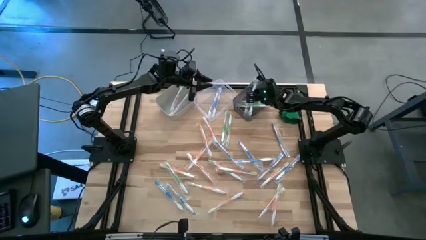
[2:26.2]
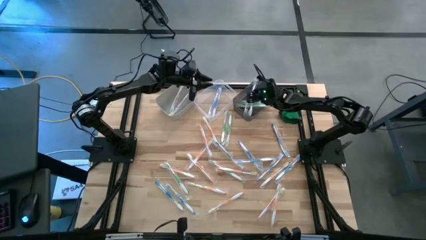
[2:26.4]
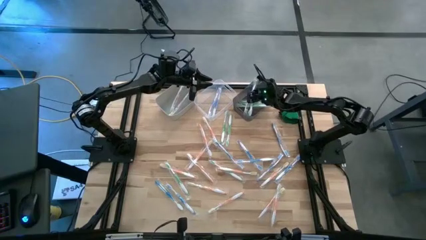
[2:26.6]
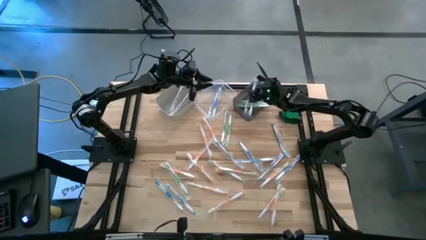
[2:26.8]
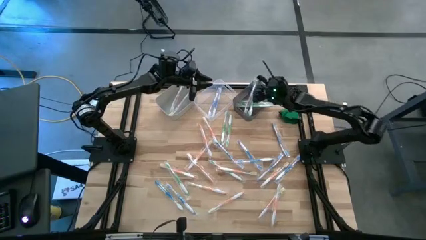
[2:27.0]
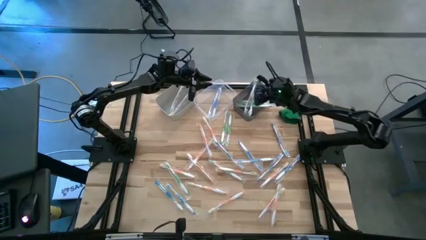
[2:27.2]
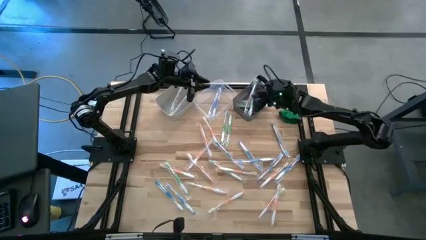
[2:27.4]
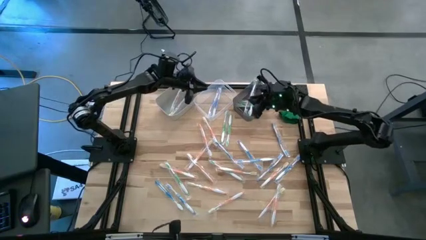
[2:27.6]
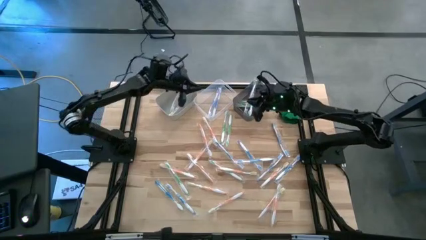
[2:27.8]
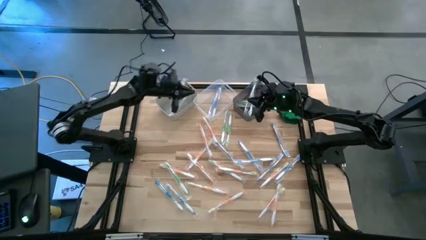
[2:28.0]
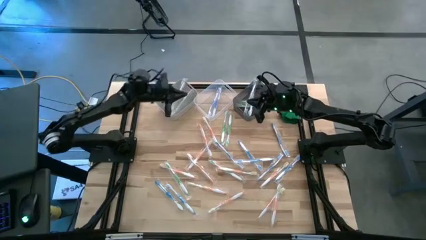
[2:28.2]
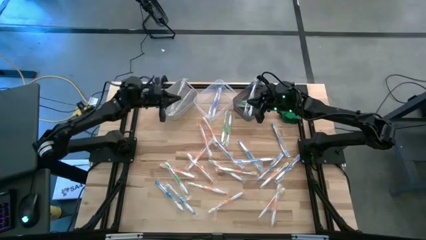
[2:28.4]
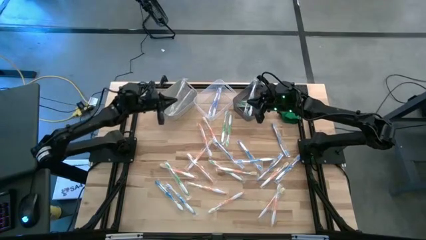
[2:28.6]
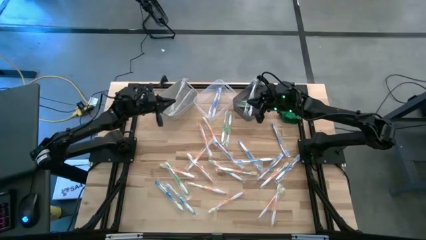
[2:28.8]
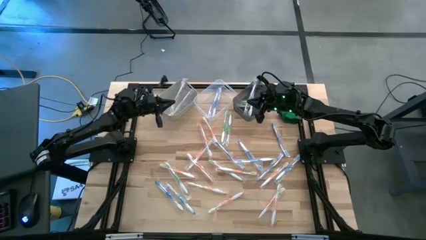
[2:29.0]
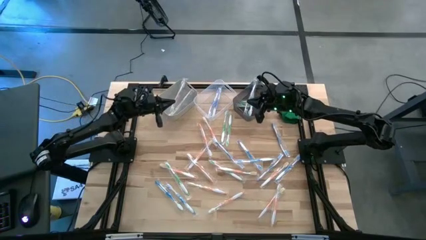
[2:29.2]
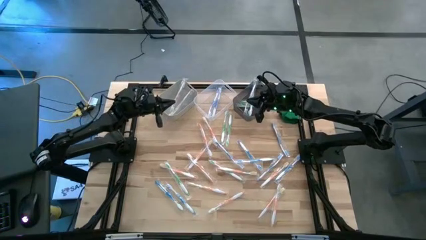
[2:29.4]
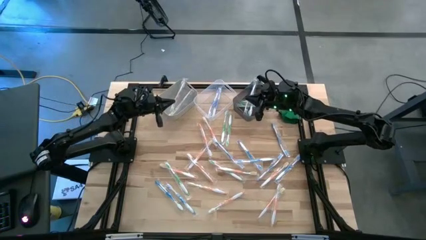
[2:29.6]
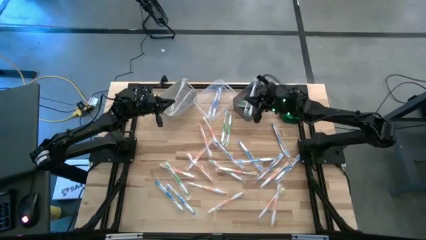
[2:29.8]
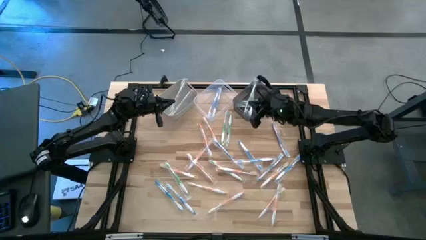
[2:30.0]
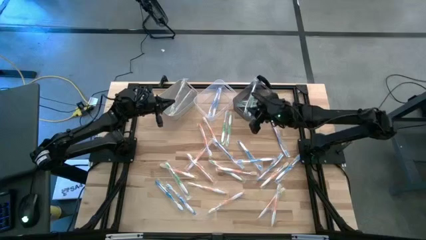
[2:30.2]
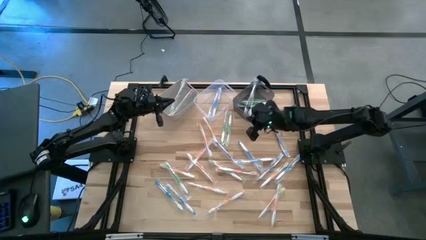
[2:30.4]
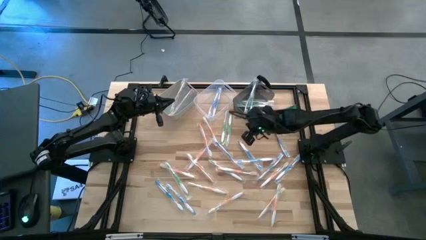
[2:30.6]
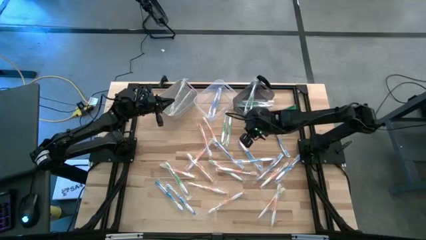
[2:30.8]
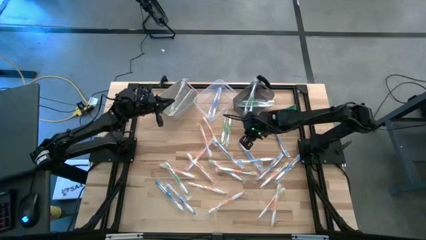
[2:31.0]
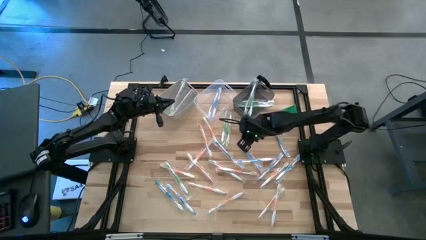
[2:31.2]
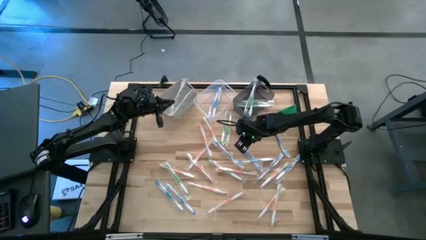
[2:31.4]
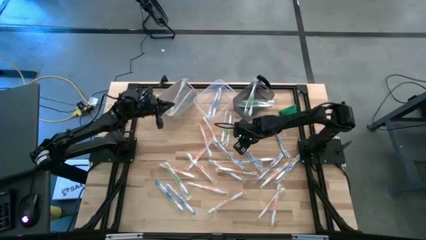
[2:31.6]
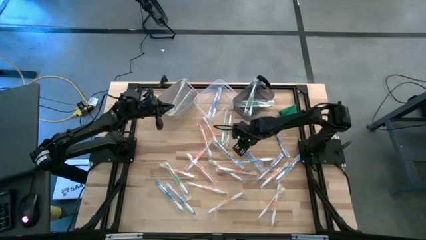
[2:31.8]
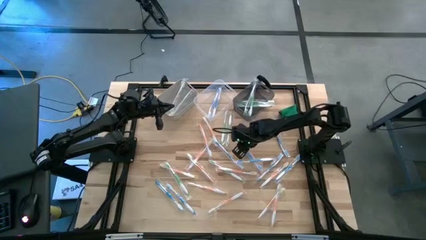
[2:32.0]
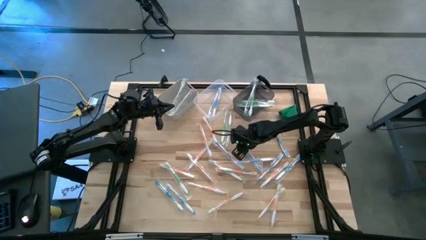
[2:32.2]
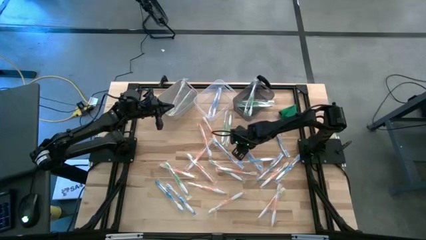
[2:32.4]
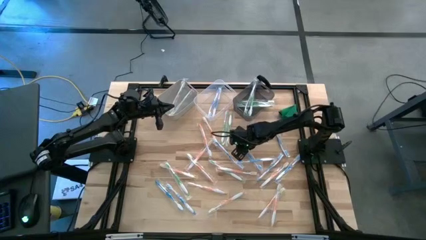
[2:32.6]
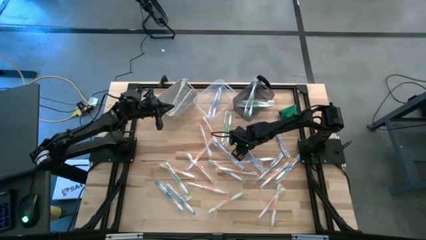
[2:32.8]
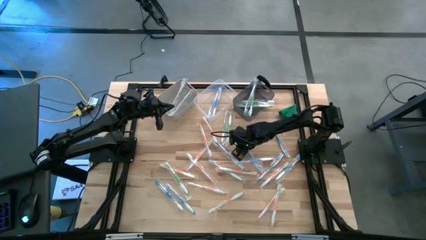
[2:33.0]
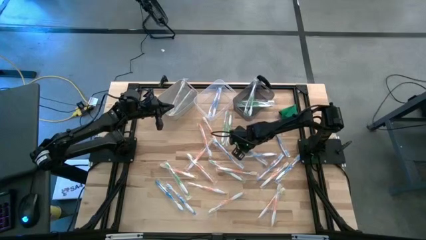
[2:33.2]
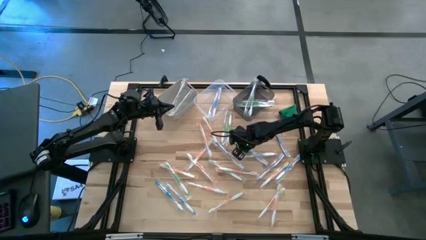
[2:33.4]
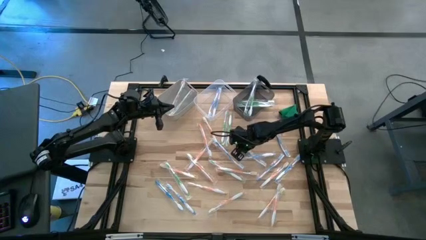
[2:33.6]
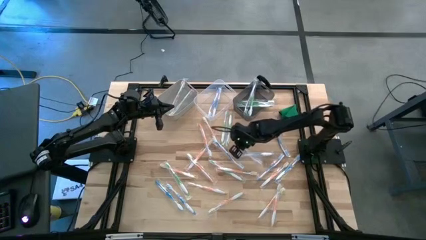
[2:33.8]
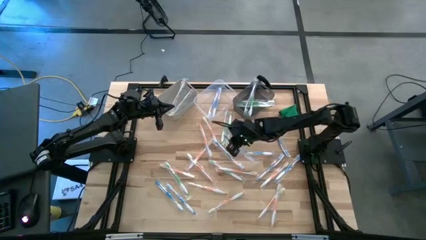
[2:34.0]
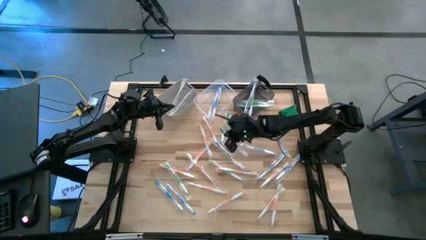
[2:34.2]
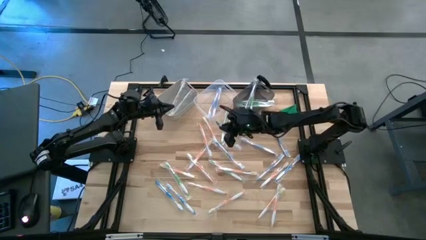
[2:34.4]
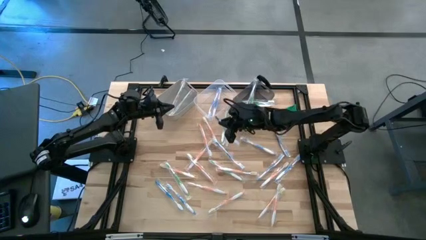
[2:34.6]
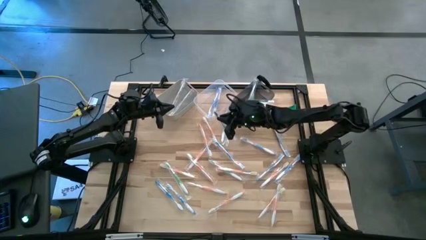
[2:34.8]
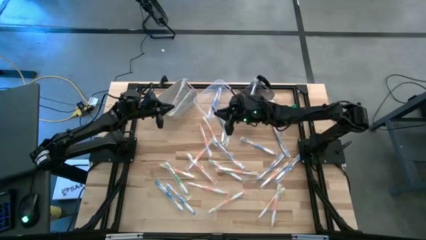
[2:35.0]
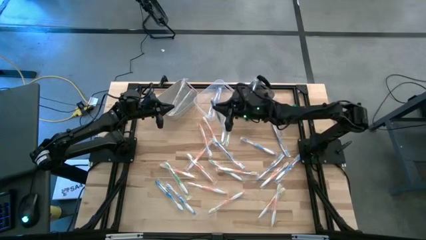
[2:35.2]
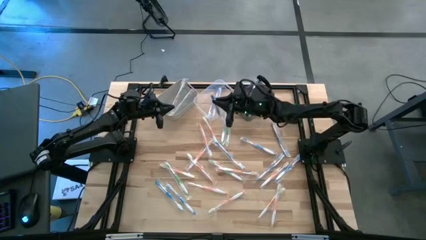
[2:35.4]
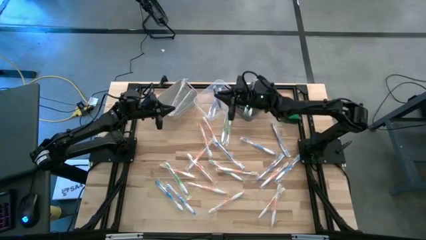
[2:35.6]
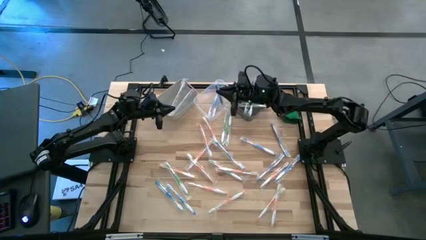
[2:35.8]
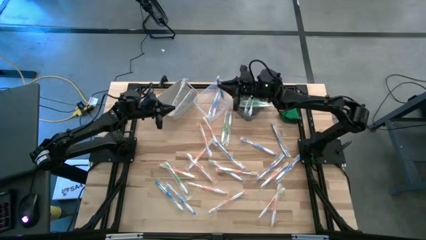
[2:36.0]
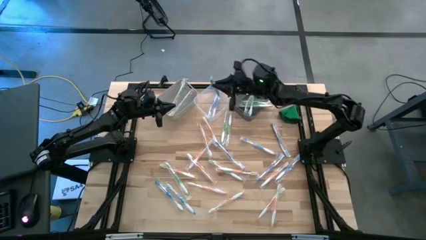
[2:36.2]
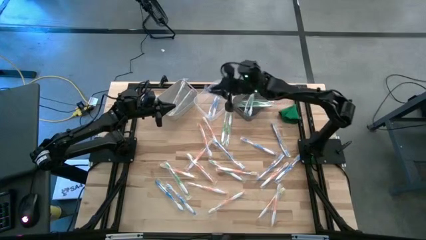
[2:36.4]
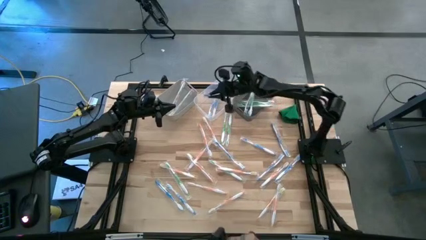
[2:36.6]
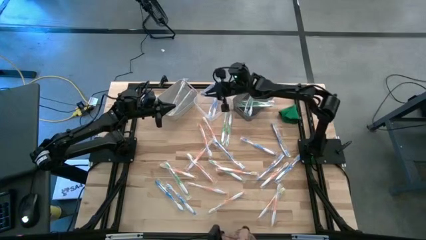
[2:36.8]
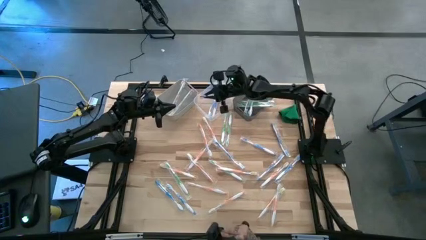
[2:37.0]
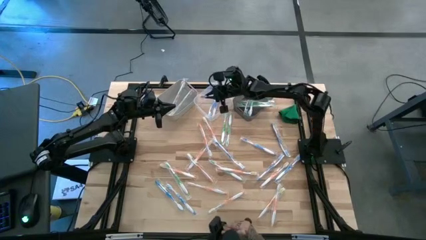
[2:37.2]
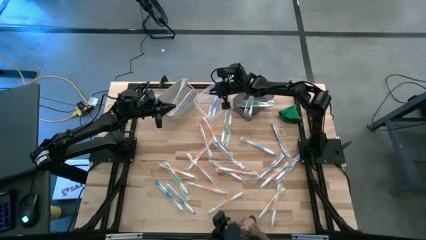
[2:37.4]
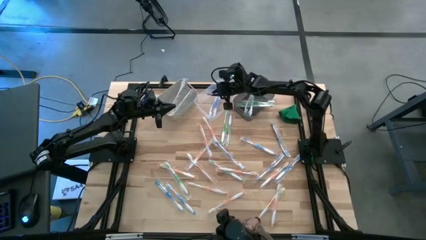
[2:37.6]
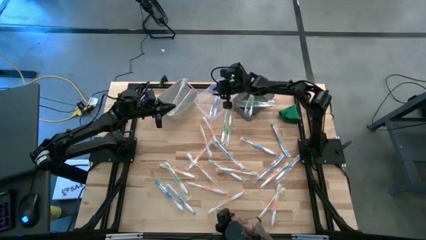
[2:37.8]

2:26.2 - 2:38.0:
Task: Pick & Place Toothbrushes
Put the blue toothbrush into the transparent bin

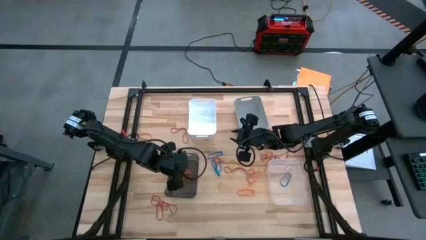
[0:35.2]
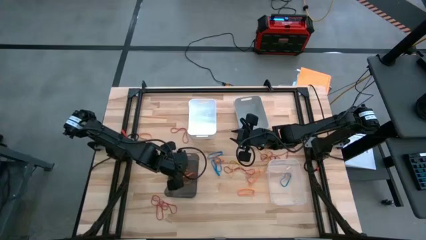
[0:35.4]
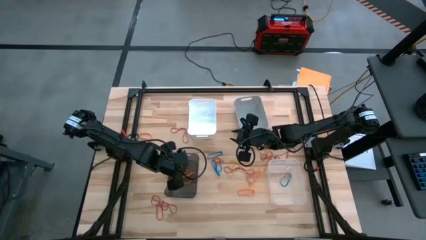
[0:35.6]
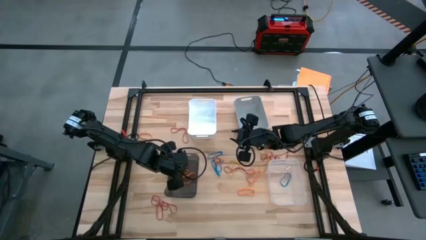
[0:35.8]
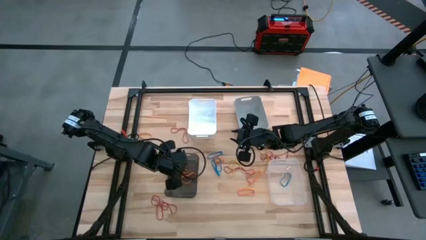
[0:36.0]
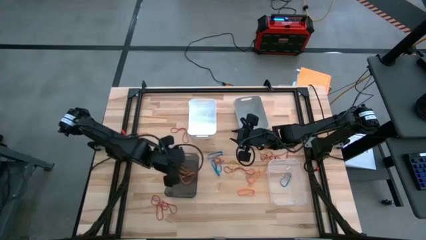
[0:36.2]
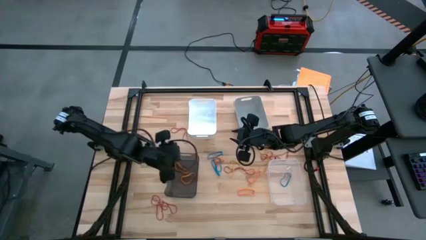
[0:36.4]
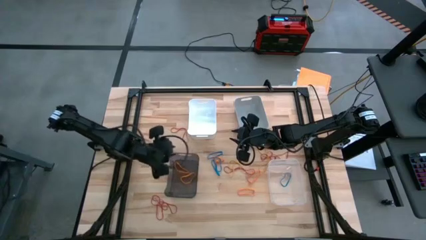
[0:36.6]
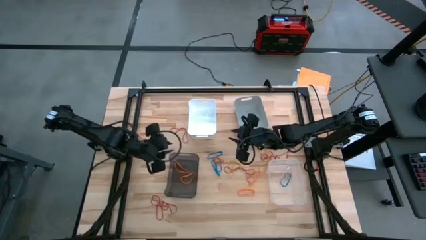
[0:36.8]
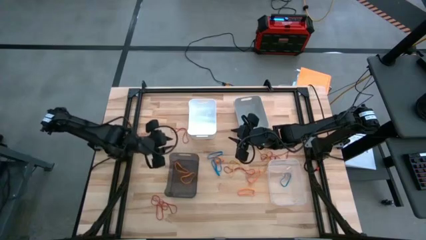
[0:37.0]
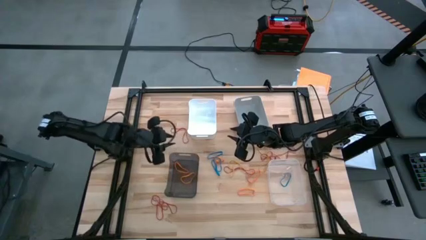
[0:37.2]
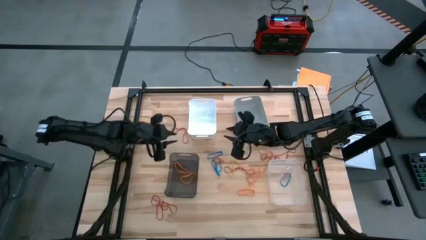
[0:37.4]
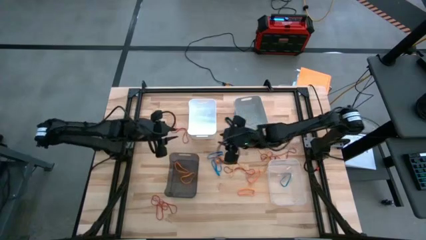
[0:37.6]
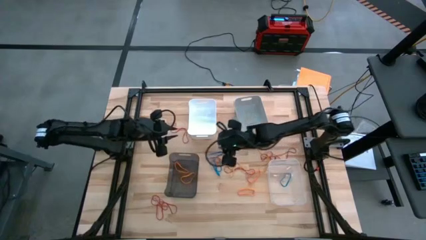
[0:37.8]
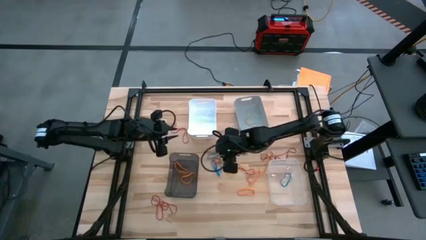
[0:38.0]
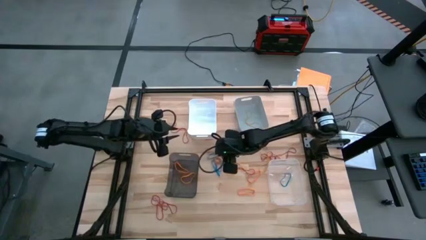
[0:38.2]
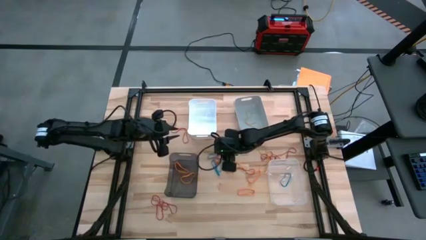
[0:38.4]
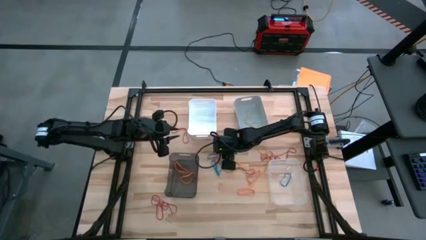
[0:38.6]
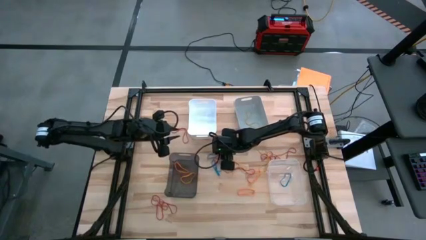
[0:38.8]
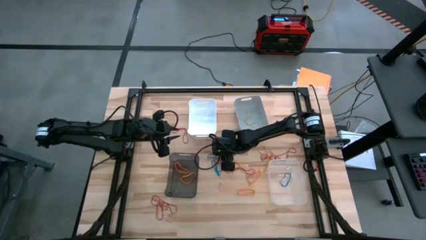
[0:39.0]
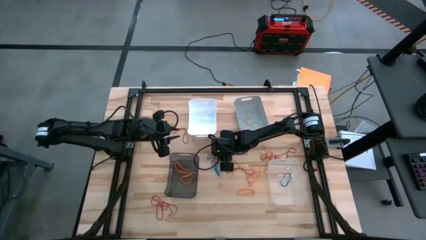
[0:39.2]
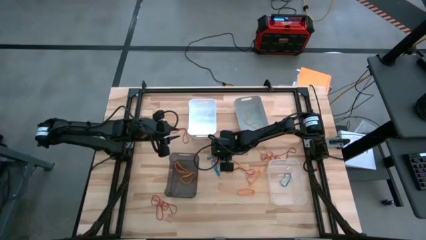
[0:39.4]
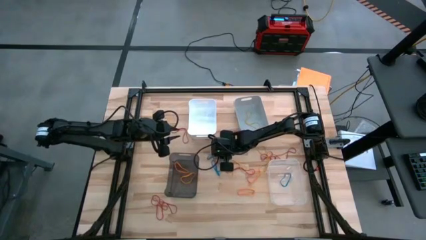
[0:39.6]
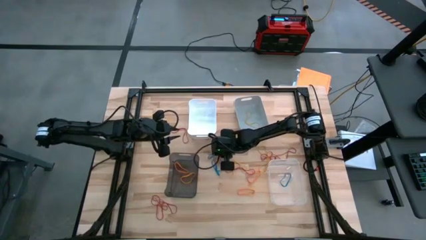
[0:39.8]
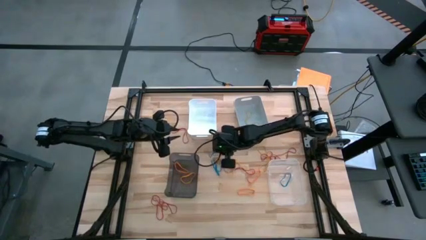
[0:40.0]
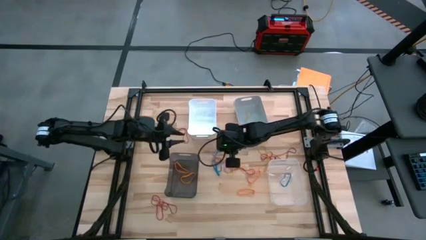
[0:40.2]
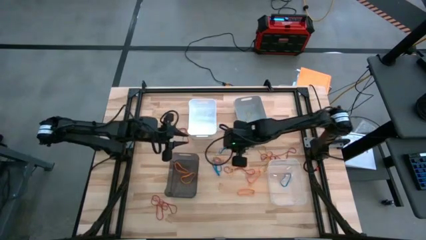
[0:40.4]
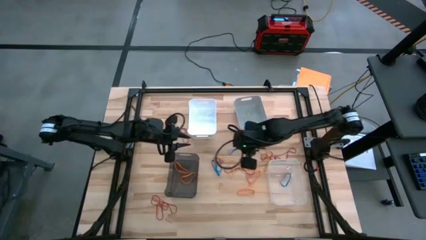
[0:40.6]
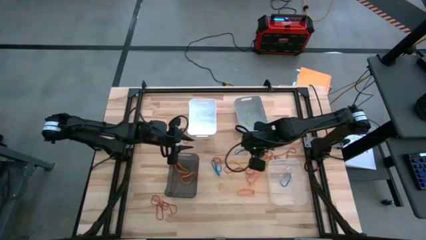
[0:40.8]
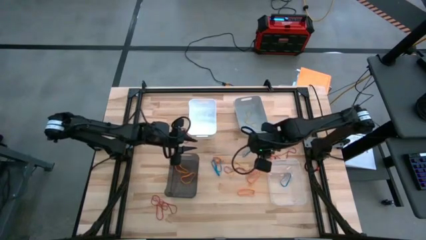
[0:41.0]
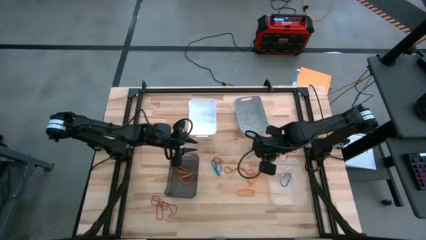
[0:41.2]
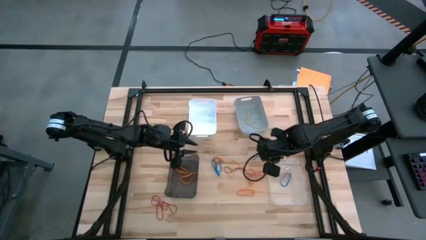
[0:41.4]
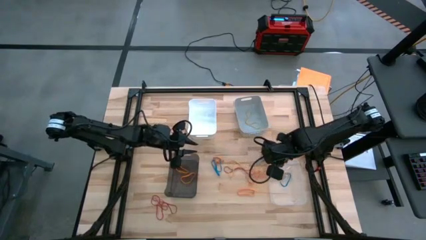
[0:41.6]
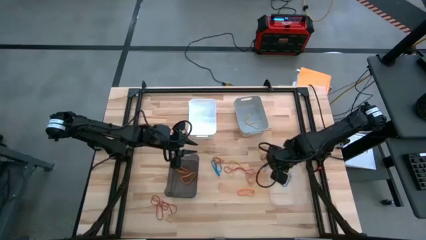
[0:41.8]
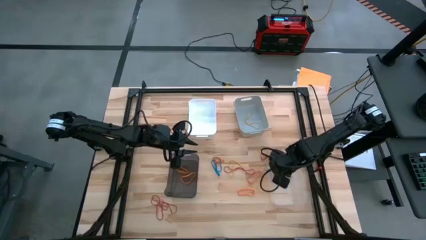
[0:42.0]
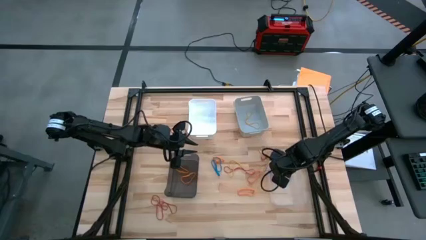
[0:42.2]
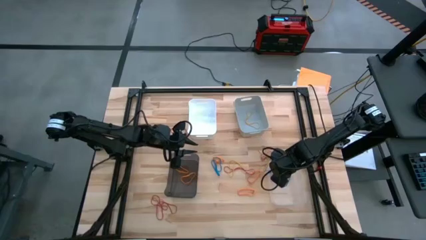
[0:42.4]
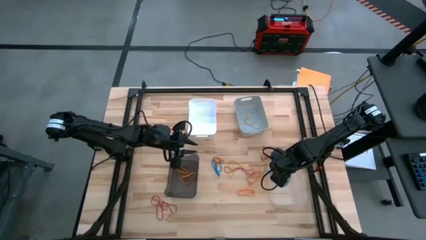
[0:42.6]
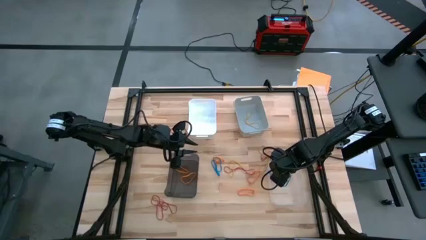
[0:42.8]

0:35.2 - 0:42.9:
Task: Sort rubber bands into baskets
Put the blue rubber band into the transparent bin
